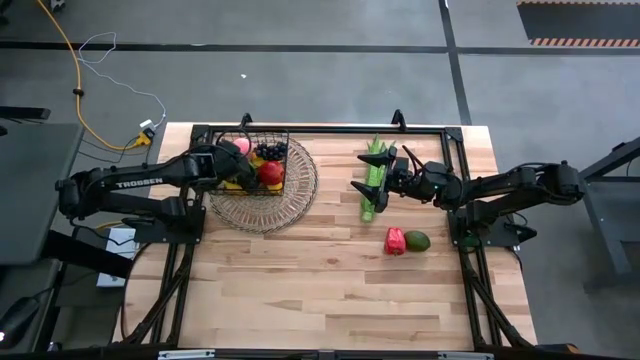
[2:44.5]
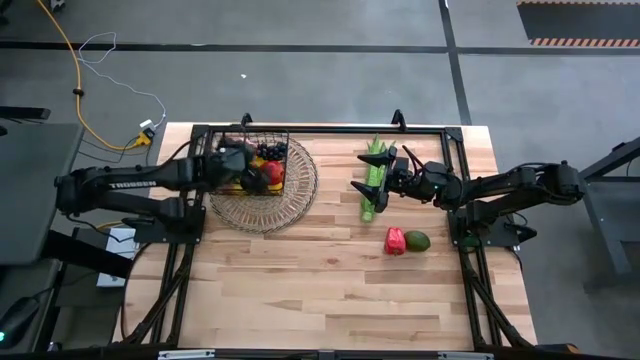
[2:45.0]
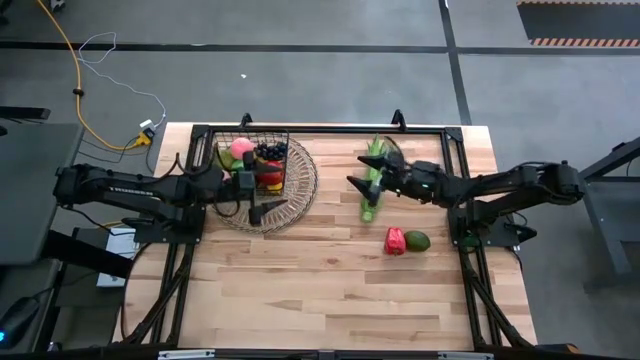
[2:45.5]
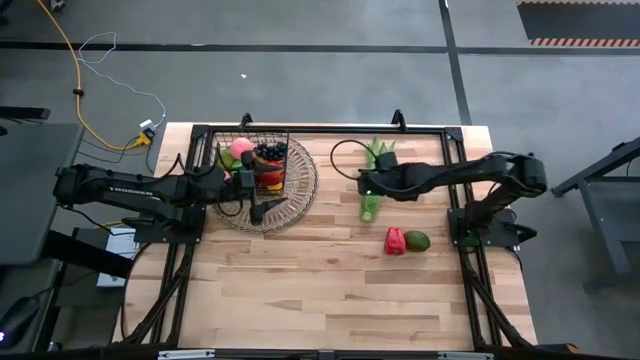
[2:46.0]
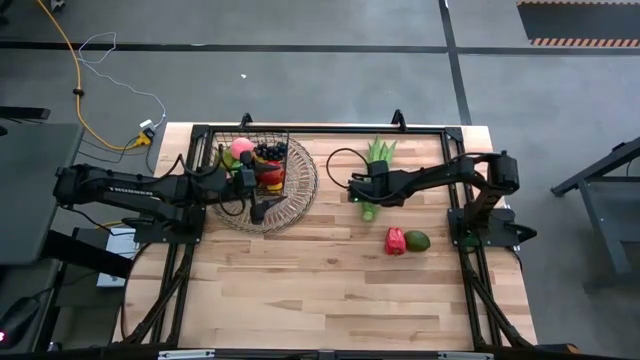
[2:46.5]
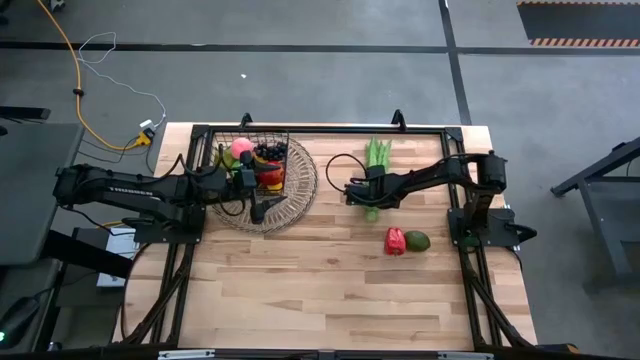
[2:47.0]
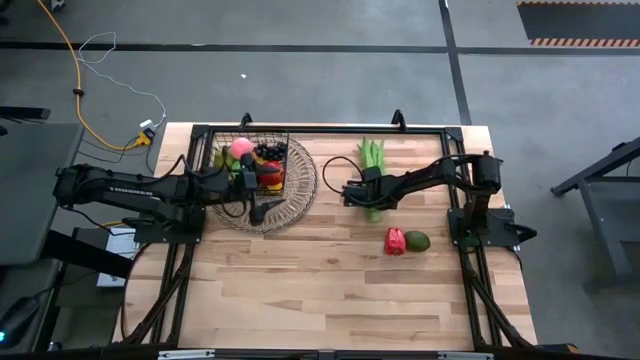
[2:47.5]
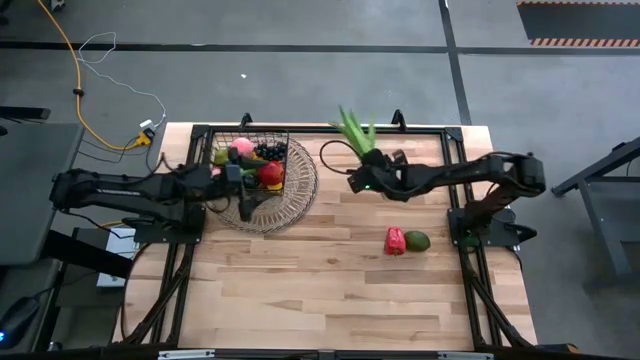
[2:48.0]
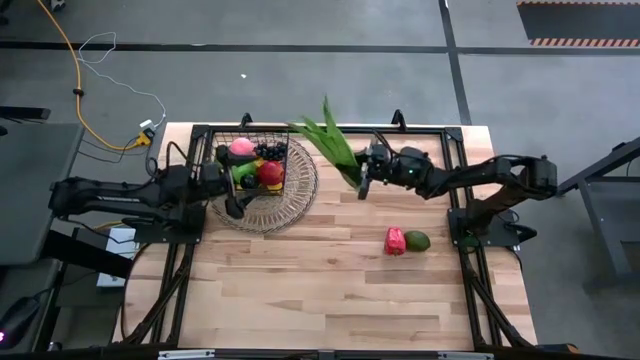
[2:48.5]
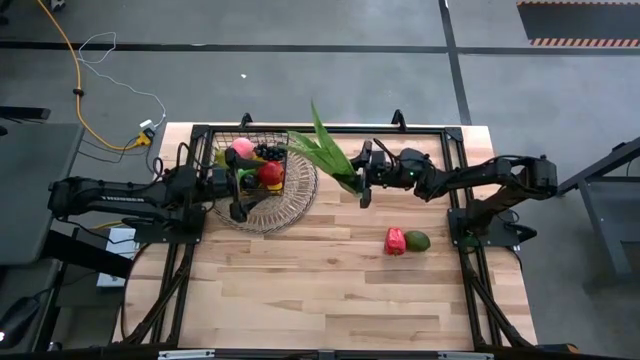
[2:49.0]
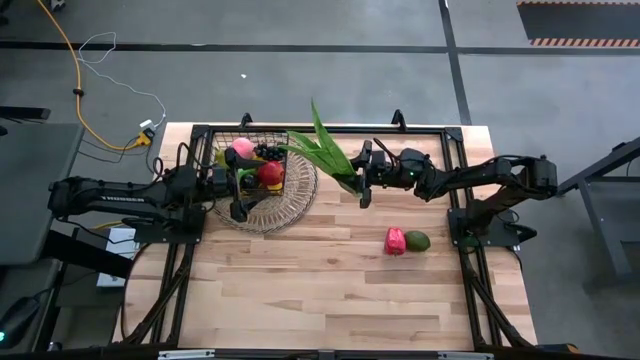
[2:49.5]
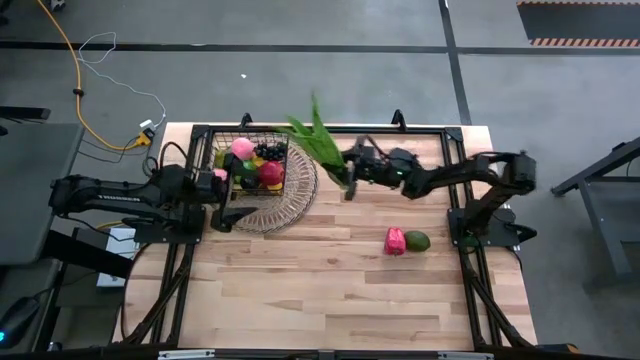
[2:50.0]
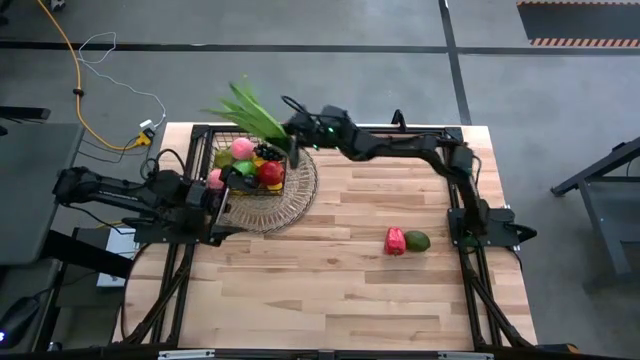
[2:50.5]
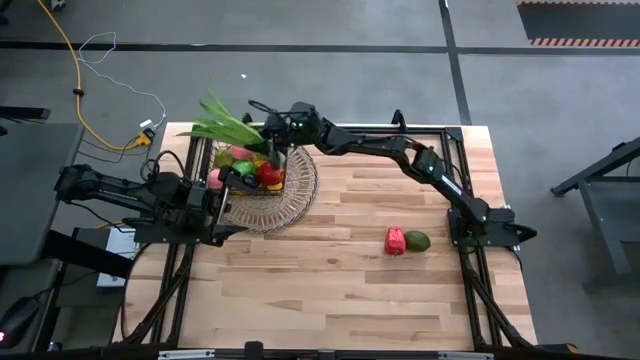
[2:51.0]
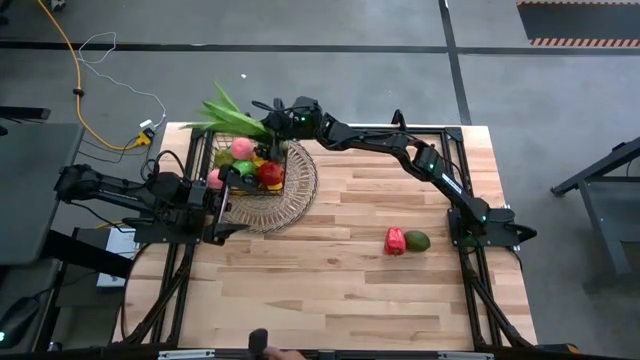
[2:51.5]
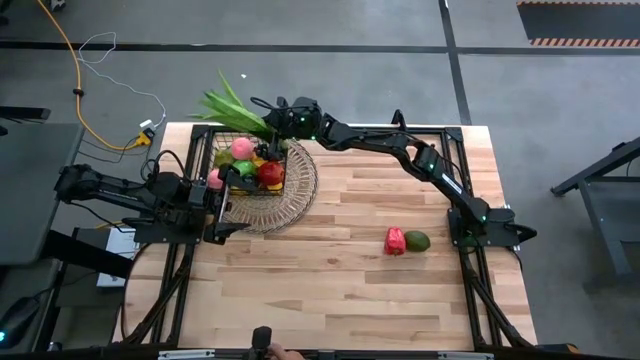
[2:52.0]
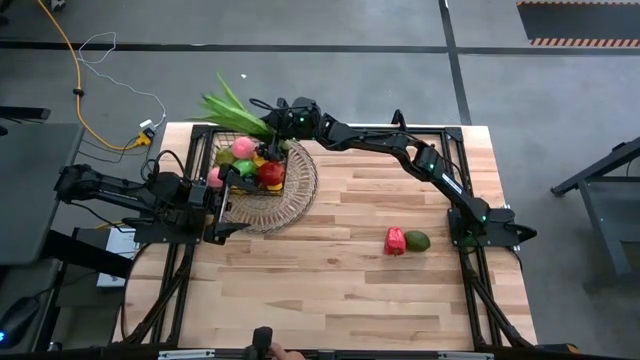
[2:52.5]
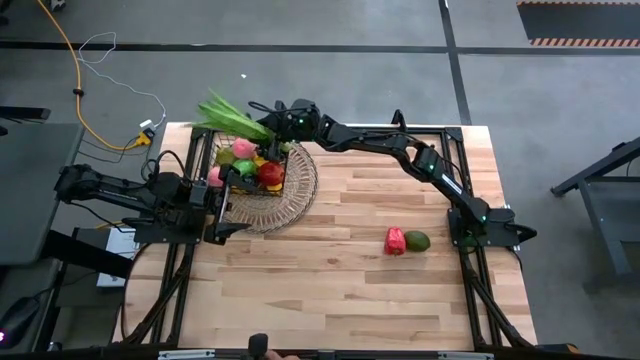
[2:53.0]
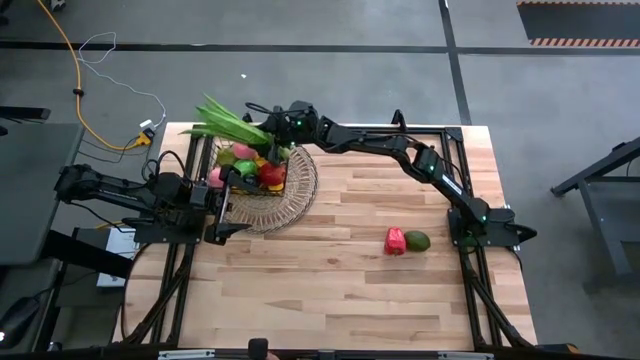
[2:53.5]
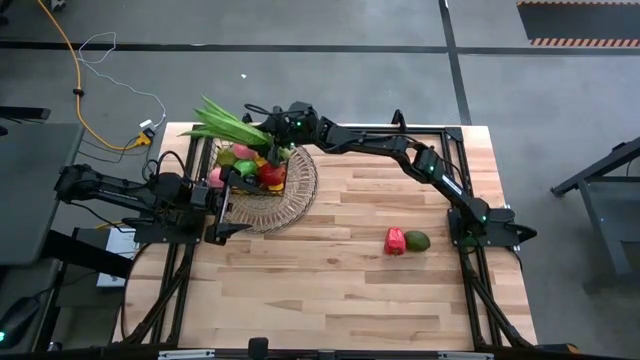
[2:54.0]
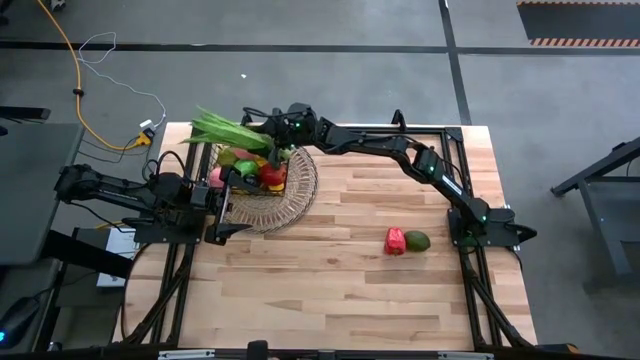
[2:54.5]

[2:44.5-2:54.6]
Task: Build produce basket
Put the green leaf lettuce into the black wire basket

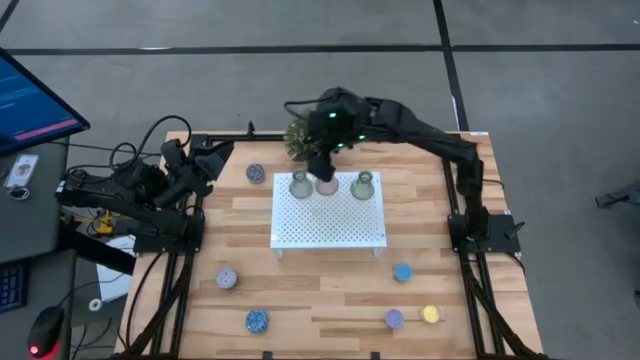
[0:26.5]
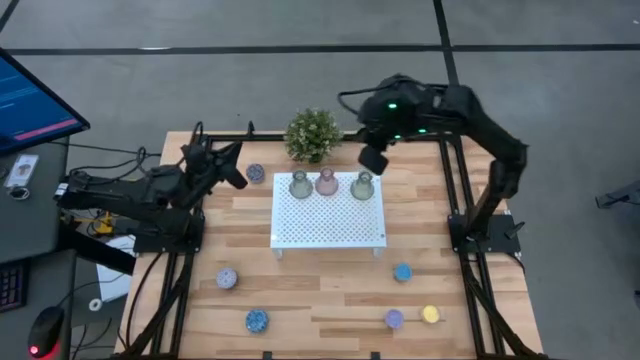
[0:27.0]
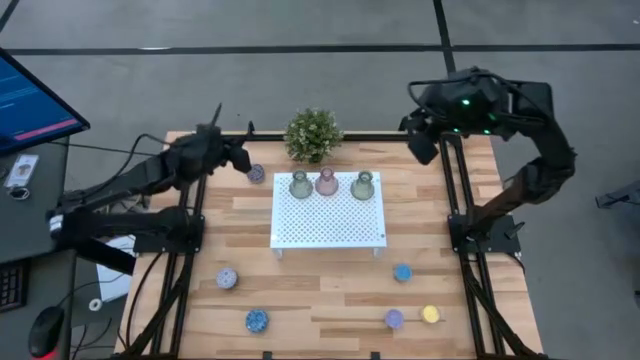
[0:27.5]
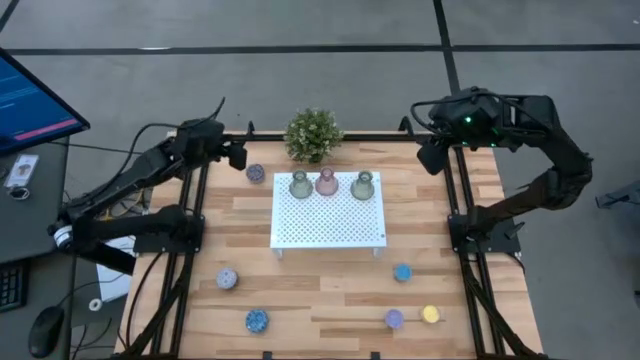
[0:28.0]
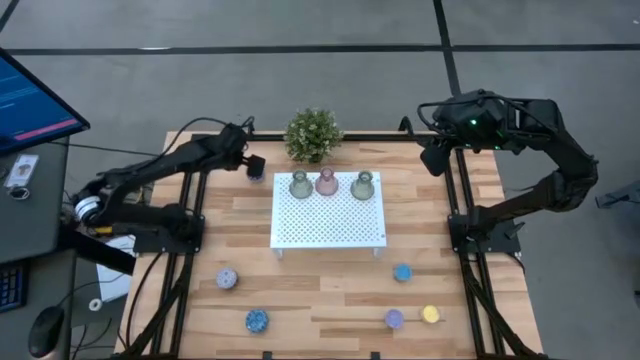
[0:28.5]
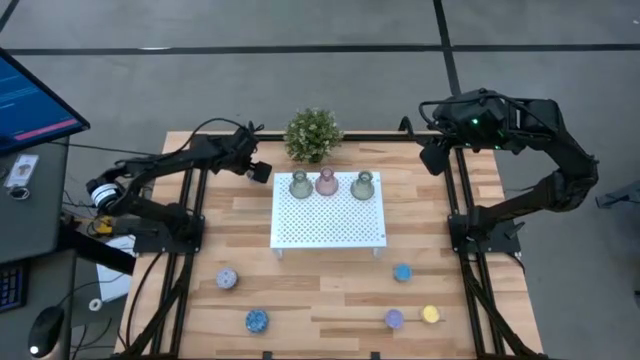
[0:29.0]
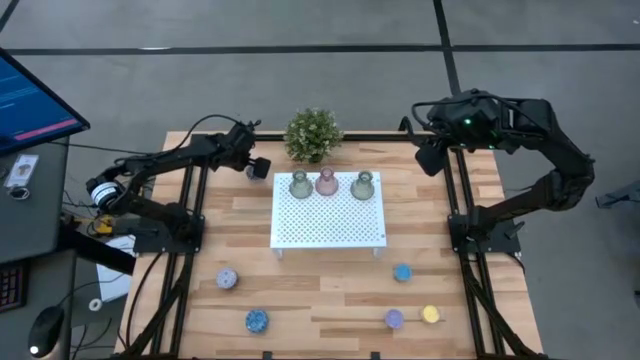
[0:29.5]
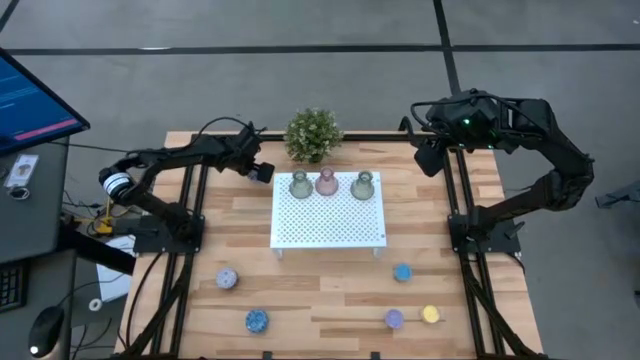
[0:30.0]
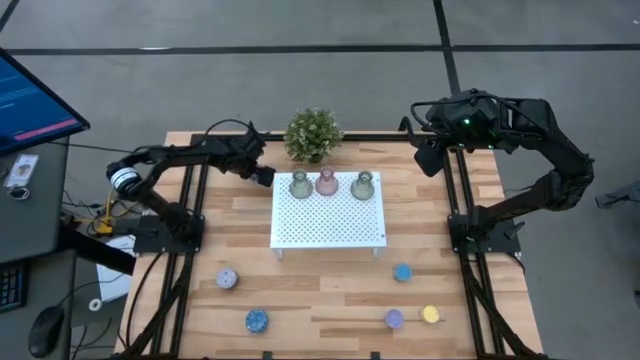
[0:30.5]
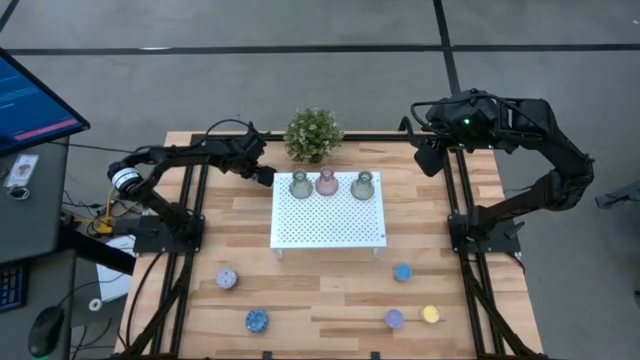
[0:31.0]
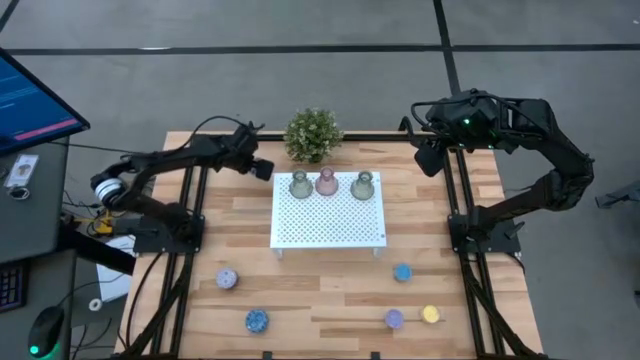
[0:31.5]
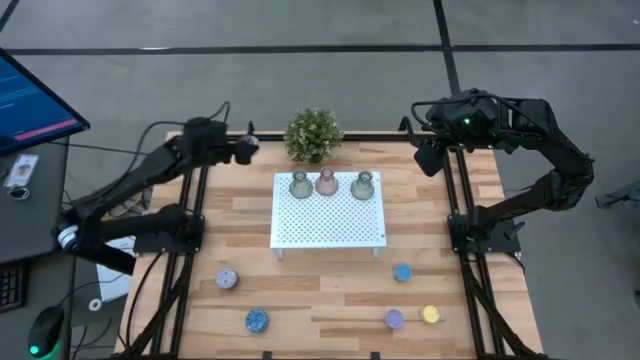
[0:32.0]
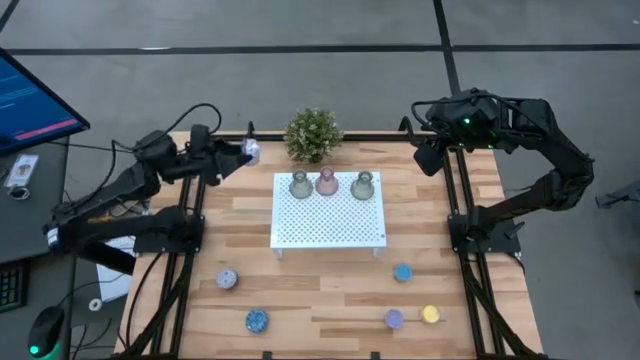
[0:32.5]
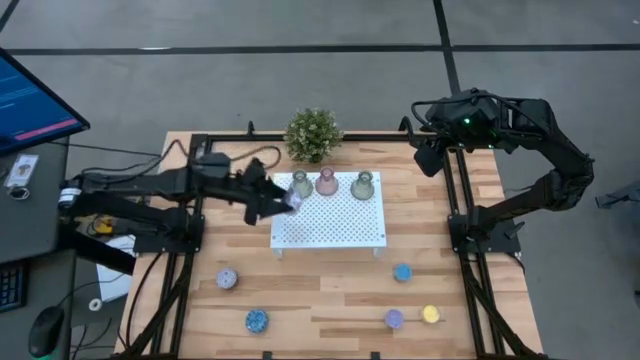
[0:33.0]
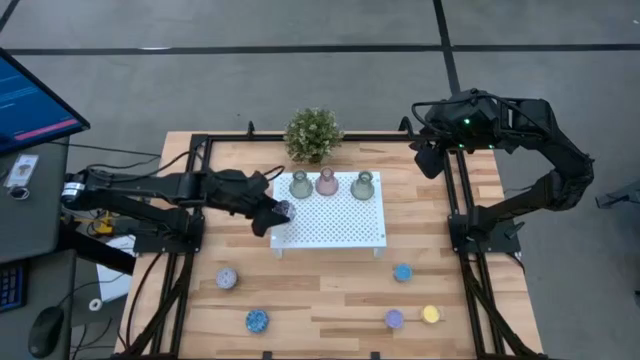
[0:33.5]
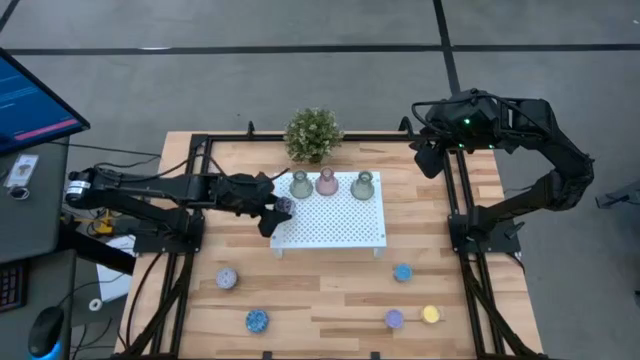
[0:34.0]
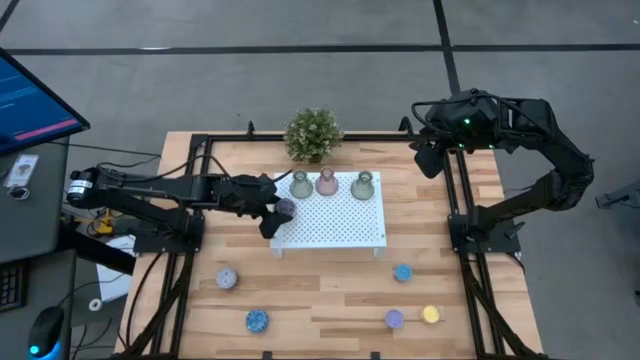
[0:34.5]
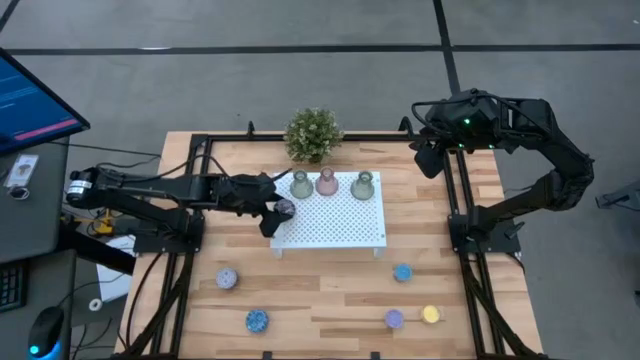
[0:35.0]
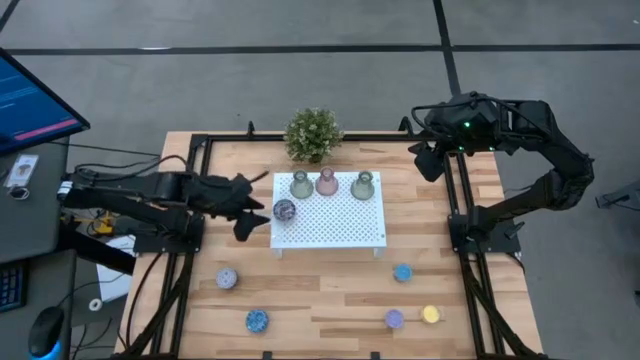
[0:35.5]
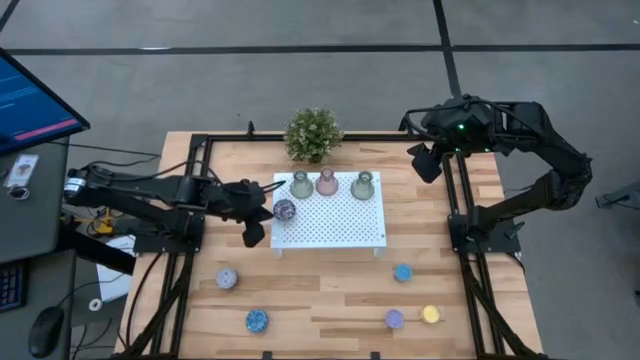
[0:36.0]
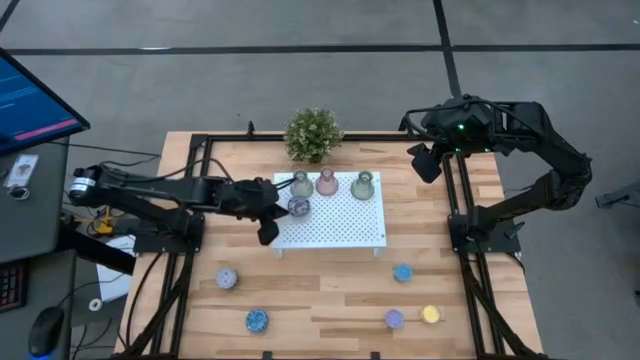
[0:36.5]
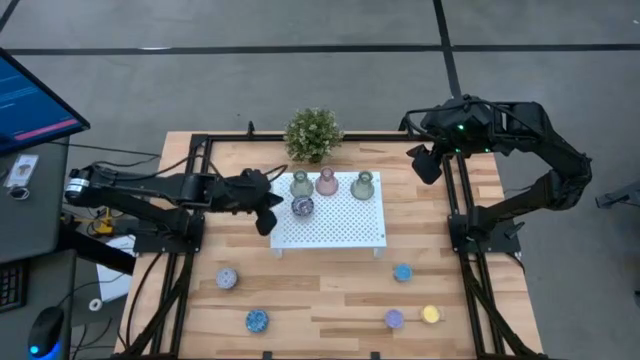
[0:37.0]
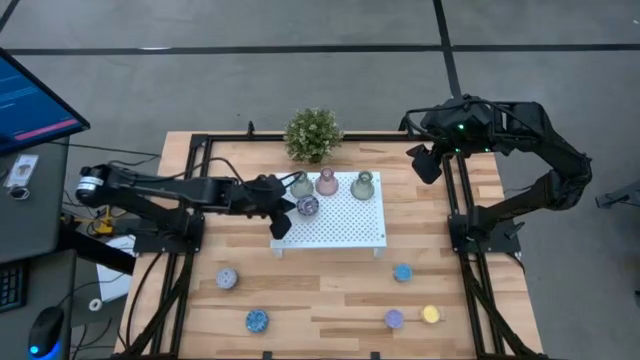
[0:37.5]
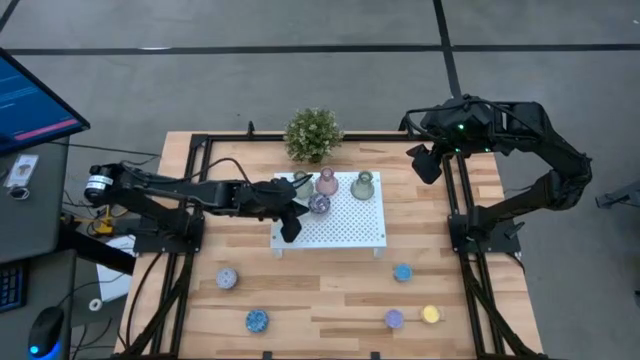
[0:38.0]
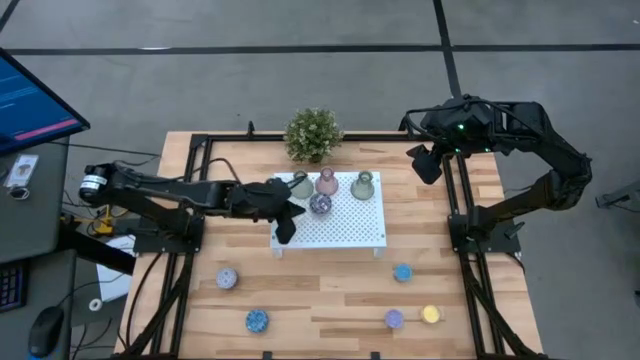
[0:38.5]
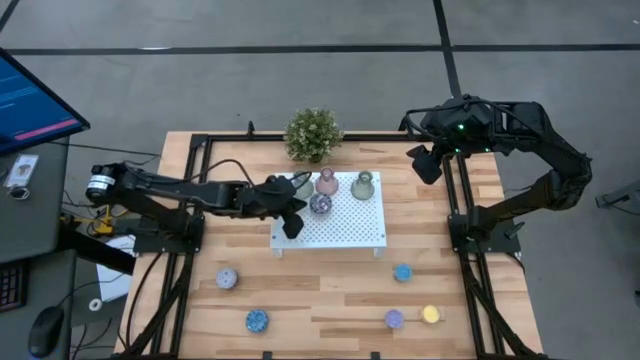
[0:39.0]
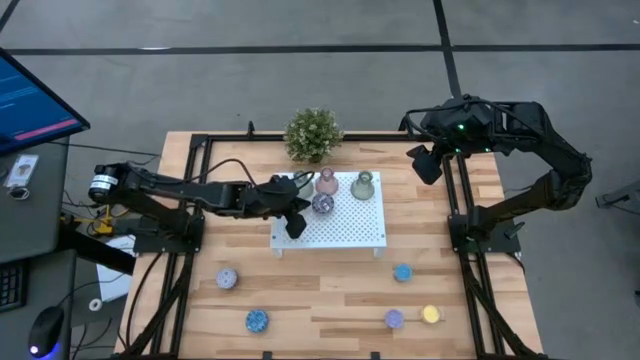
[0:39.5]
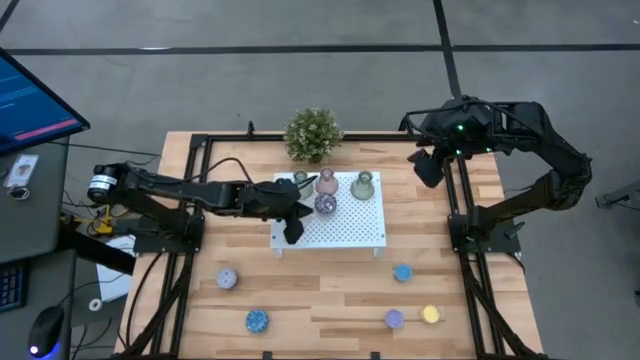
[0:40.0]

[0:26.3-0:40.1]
Task: Pick & Place candle stick holders
Put the red patterned scented candle on the shelf
